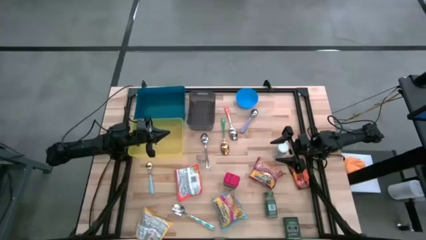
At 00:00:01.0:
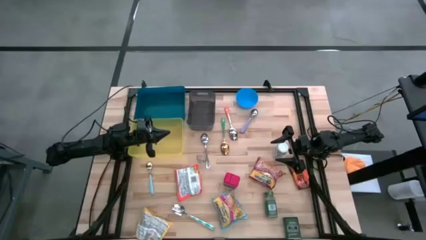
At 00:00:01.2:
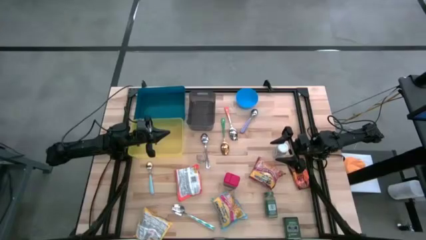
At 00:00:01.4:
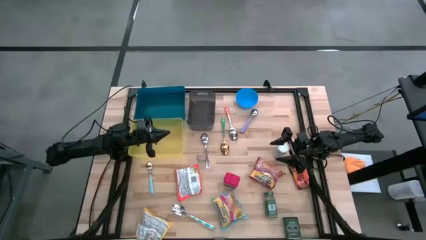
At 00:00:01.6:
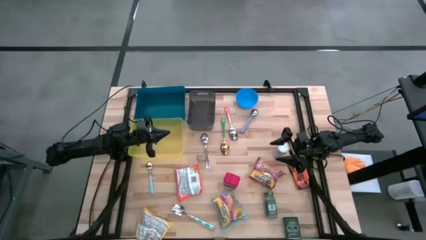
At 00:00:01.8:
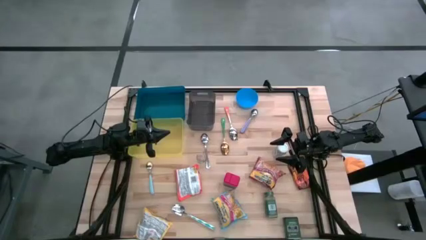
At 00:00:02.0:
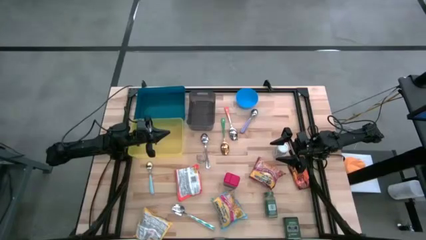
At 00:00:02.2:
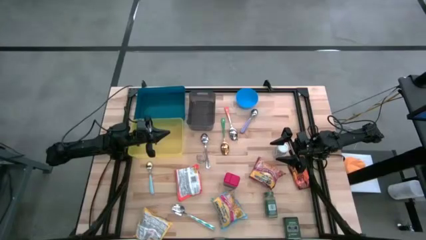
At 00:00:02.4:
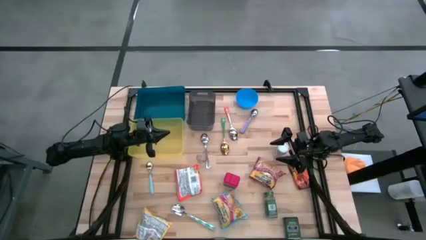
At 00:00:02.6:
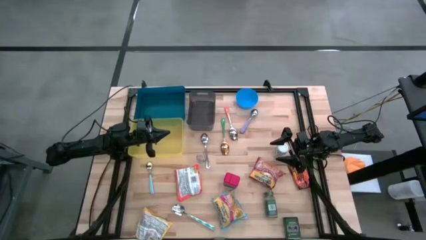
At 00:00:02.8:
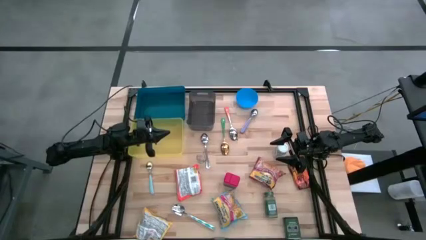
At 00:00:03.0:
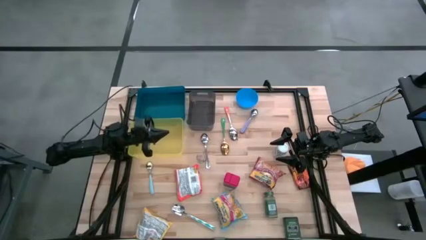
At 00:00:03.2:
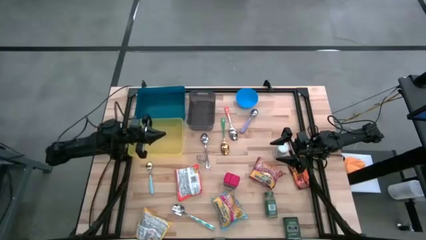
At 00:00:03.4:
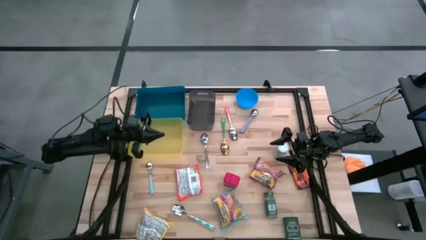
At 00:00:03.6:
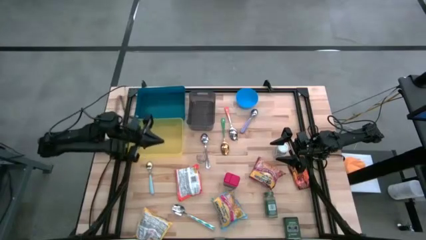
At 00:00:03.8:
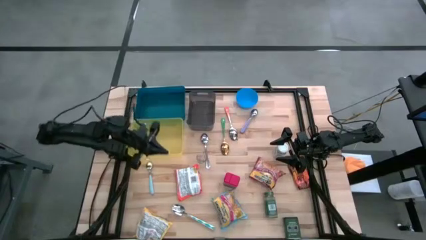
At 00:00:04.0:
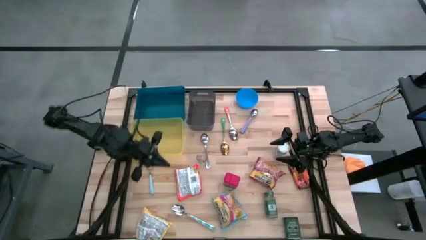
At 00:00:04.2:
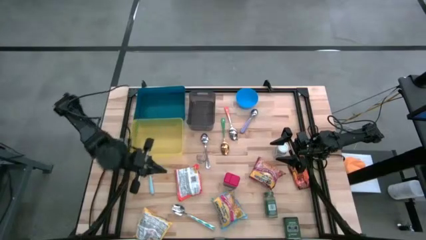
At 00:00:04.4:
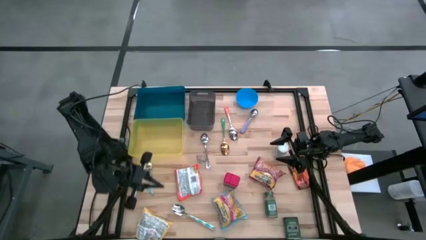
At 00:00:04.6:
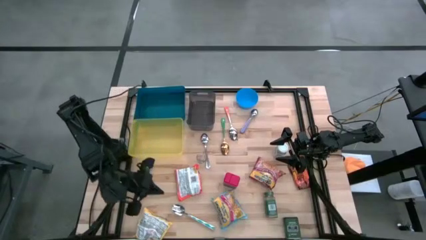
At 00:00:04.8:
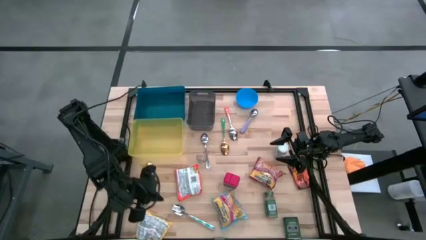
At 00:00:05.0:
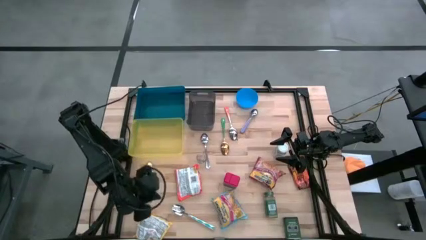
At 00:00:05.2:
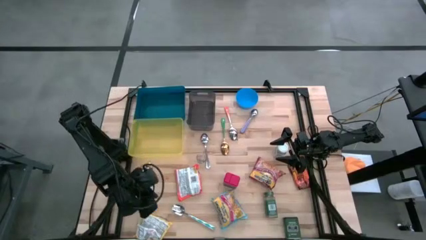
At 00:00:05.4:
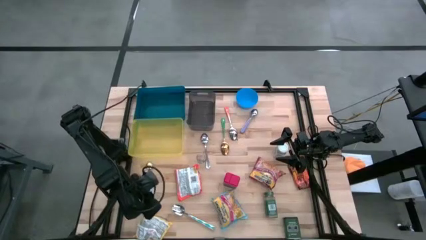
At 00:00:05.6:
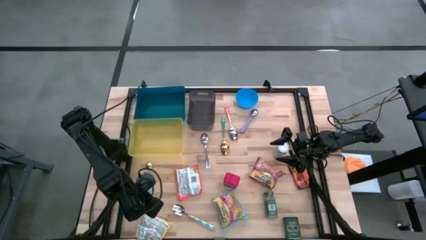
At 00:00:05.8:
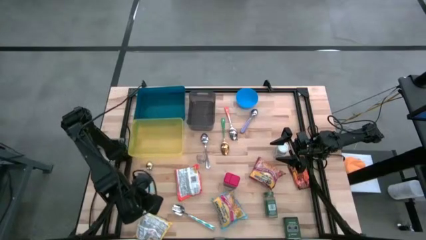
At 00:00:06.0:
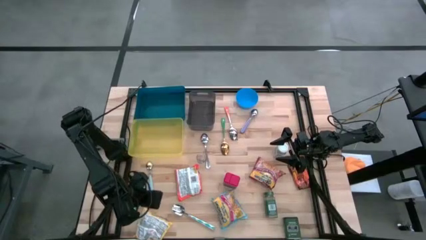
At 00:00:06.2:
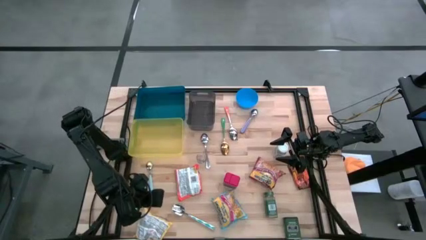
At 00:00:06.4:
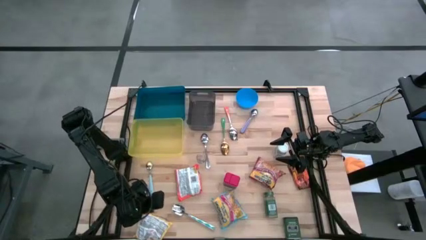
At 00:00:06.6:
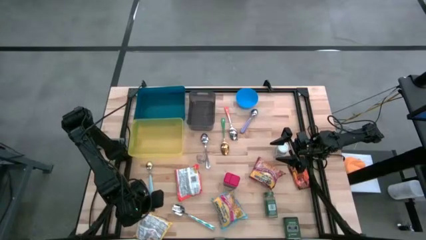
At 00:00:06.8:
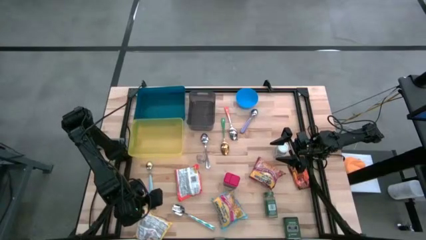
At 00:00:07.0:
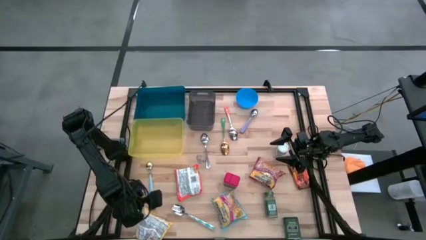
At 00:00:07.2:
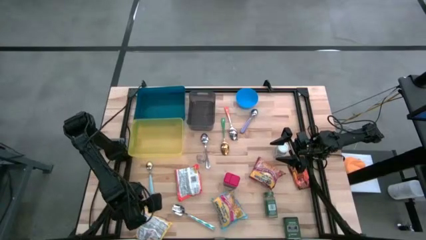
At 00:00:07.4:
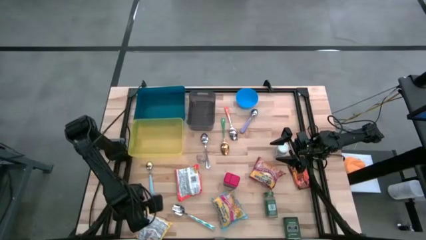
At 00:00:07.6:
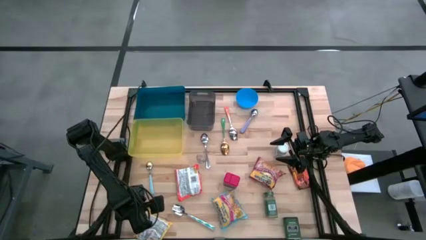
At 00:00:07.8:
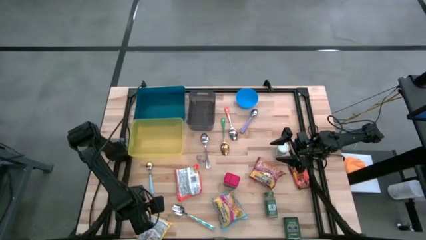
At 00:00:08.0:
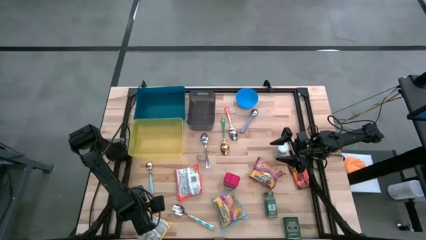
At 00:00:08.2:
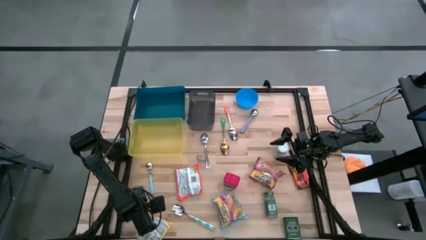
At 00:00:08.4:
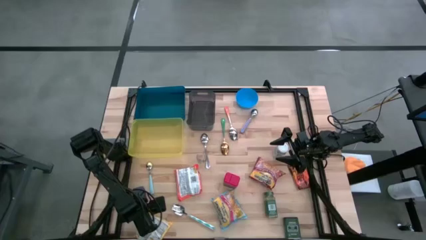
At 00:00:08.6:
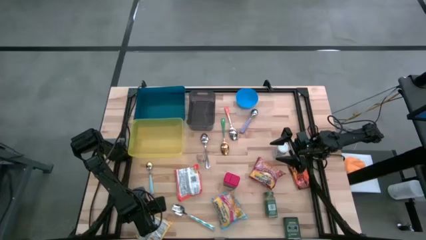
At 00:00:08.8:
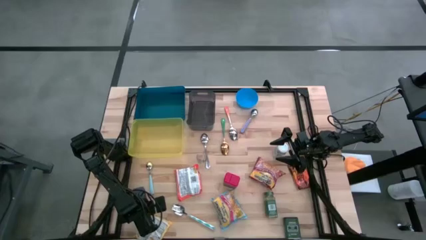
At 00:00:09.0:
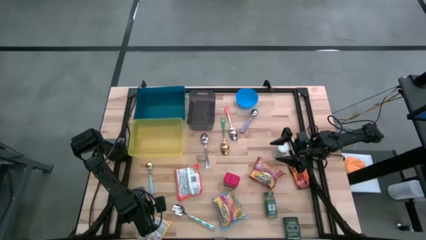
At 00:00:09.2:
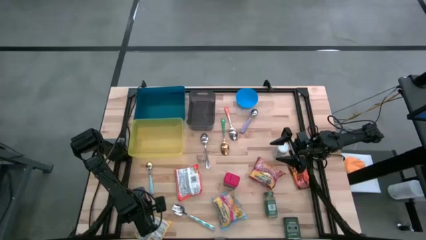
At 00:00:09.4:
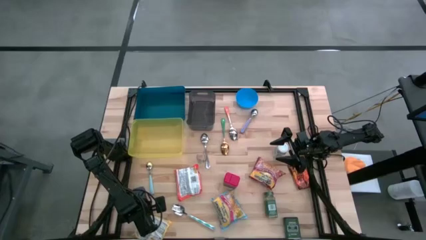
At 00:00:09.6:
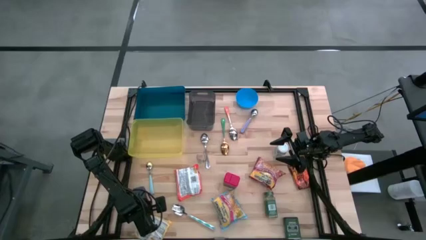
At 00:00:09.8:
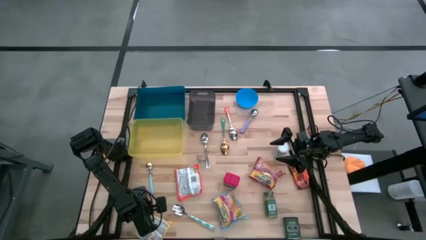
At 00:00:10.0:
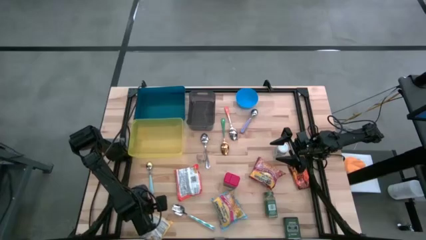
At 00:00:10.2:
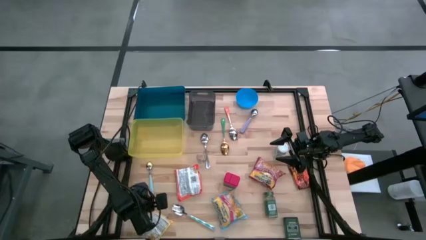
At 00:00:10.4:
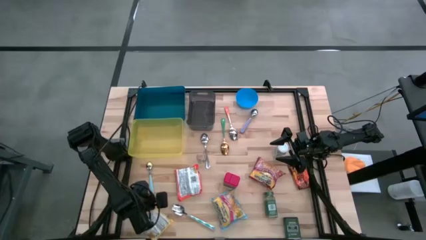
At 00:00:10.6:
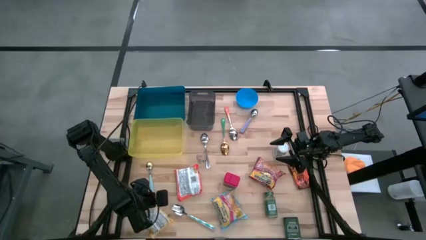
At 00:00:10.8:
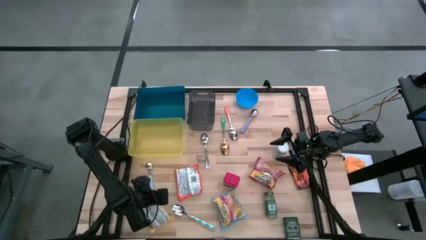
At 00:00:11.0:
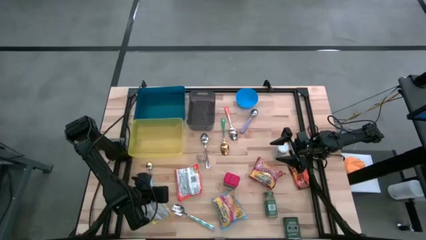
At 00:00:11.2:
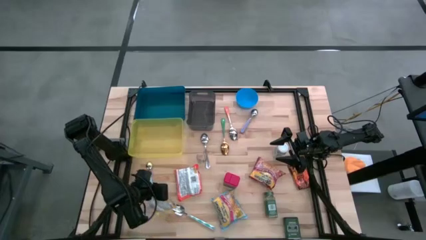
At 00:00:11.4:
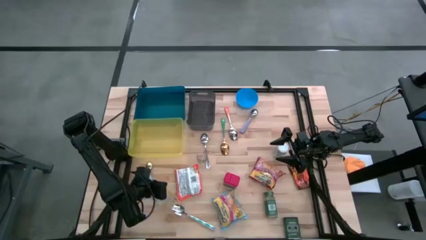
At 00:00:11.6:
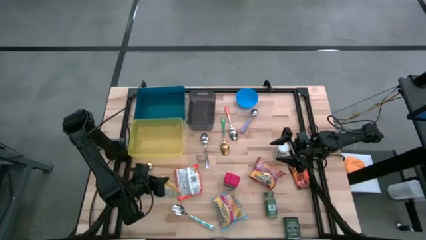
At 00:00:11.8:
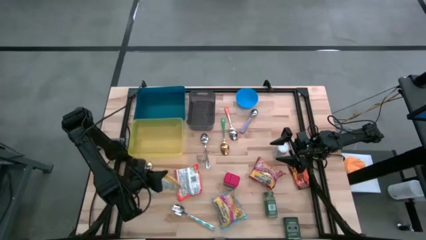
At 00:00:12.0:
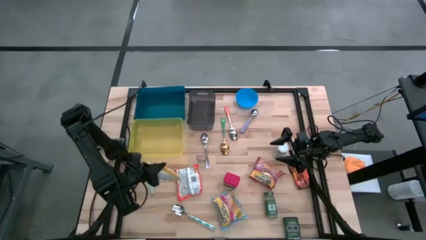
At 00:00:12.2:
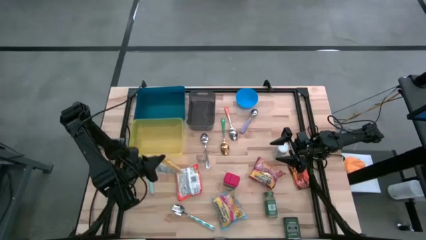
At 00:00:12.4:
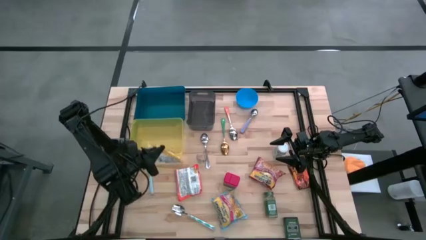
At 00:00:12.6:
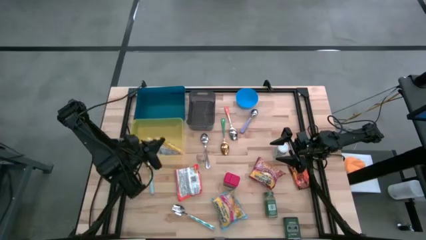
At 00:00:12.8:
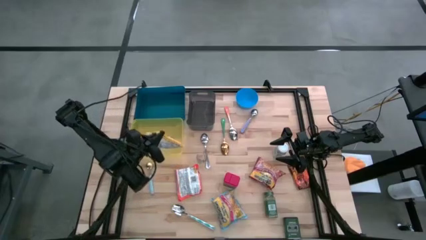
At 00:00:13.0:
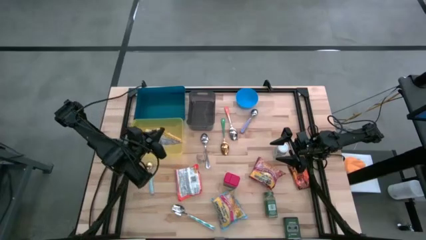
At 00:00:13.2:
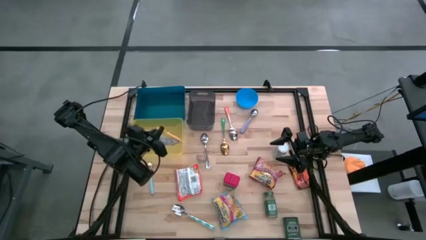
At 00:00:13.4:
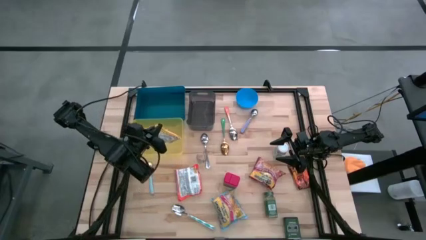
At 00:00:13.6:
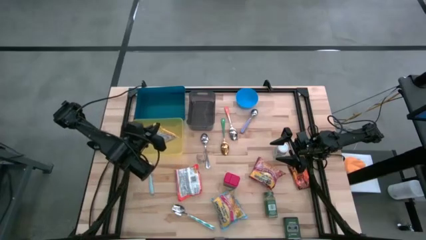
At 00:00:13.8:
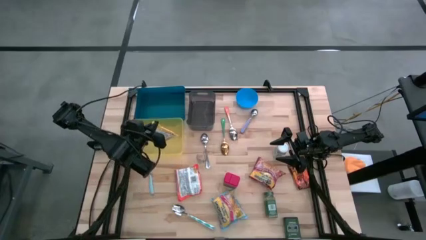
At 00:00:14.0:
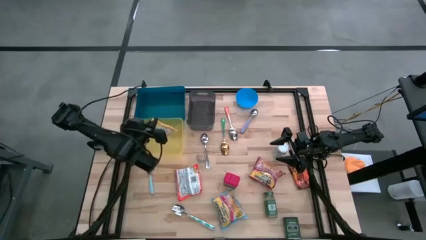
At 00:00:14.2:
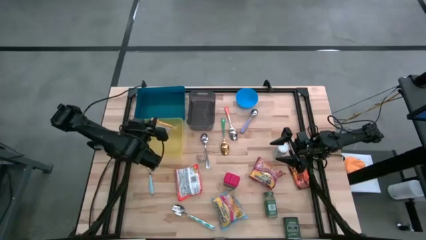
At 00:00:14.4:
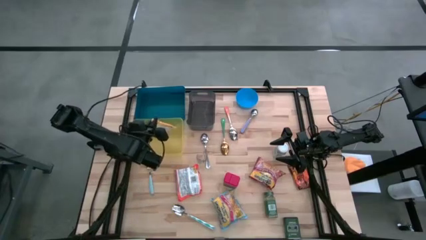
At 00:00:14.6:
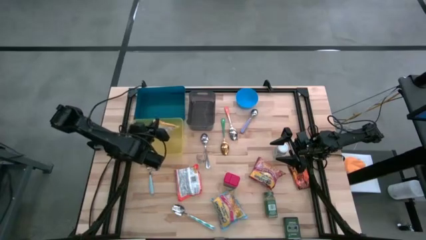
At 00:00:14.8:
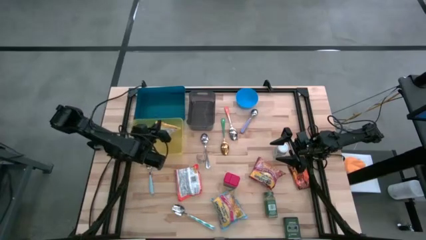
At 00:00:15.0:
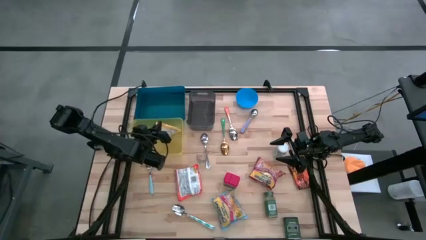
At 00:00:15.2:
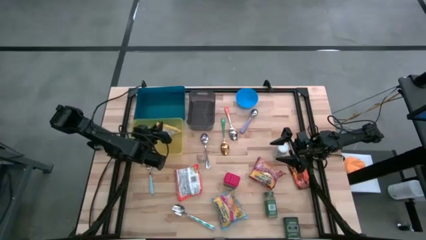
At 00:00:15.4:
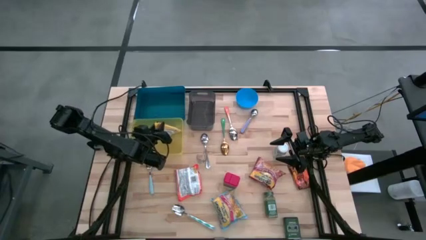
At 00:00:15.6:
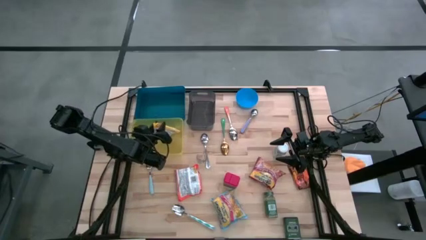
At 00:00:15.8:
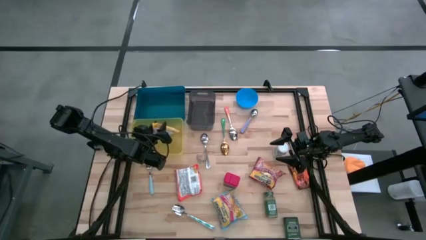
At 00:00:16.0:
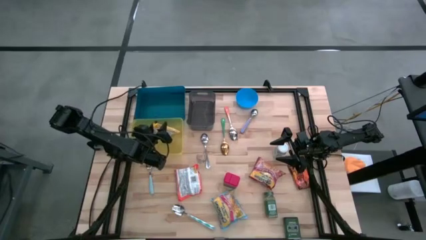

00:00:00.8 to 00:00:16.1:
Put the yellow noodle pack into the yellow bin
